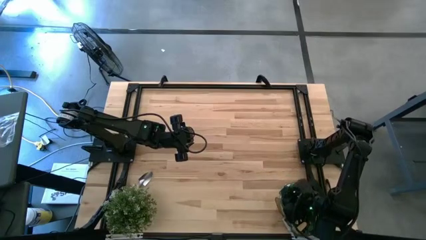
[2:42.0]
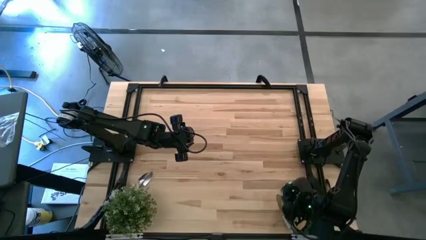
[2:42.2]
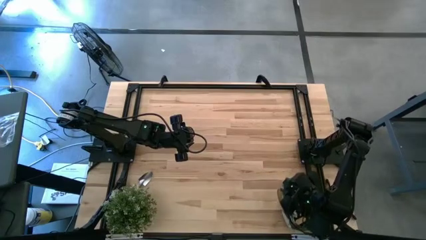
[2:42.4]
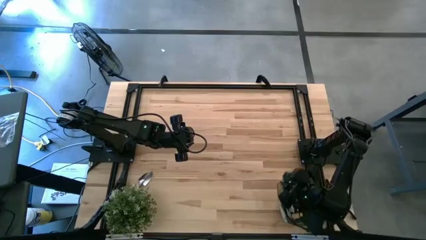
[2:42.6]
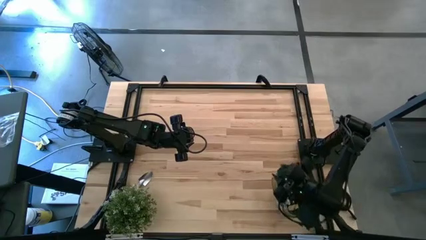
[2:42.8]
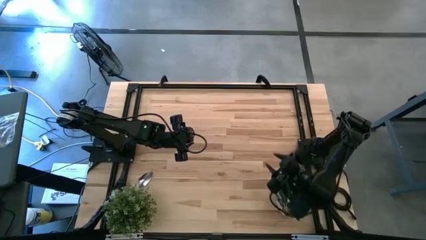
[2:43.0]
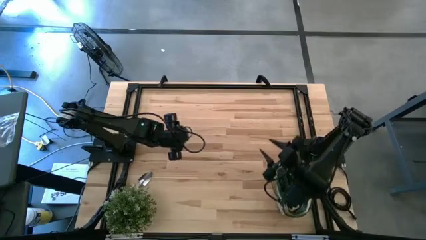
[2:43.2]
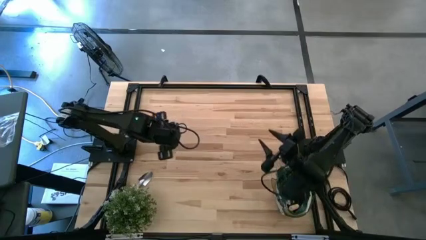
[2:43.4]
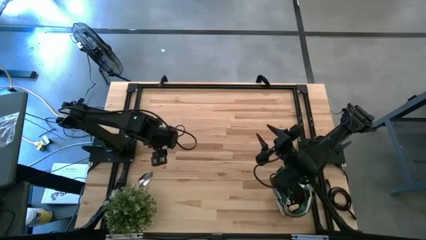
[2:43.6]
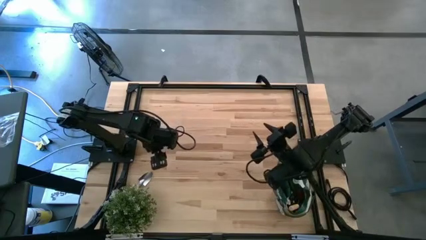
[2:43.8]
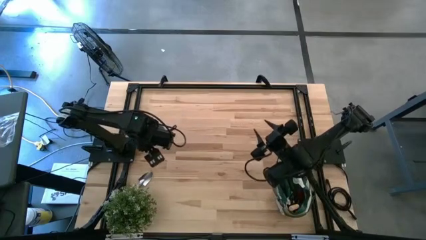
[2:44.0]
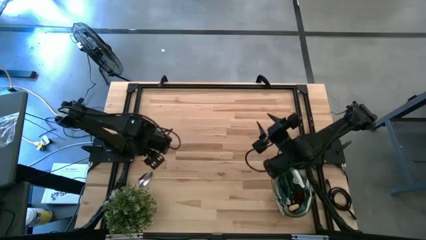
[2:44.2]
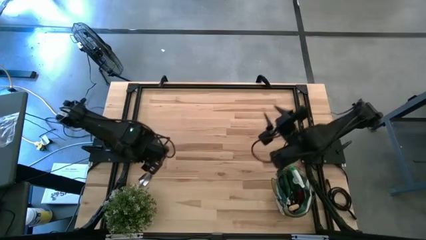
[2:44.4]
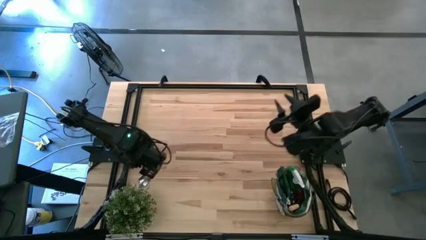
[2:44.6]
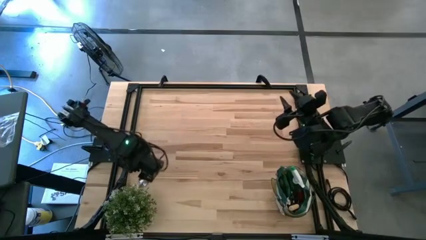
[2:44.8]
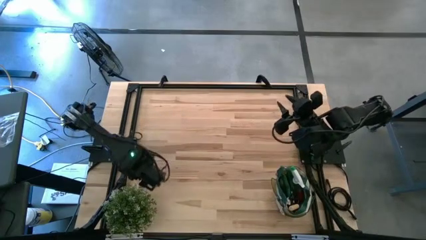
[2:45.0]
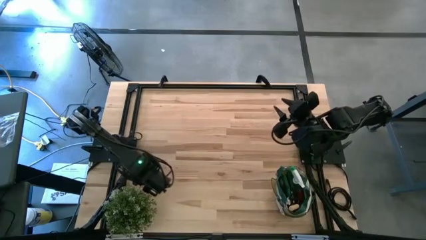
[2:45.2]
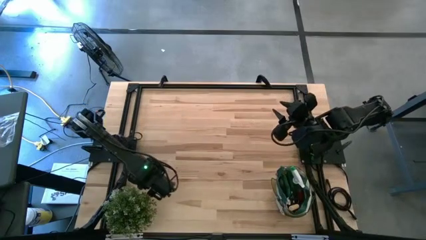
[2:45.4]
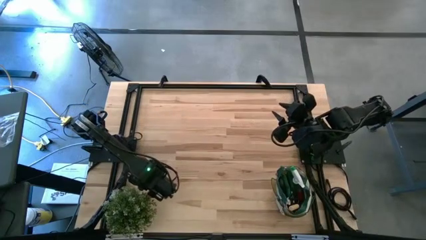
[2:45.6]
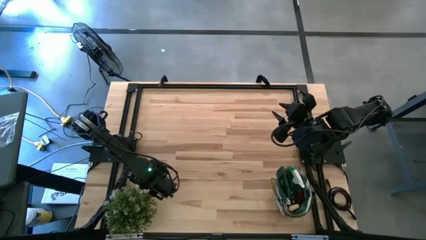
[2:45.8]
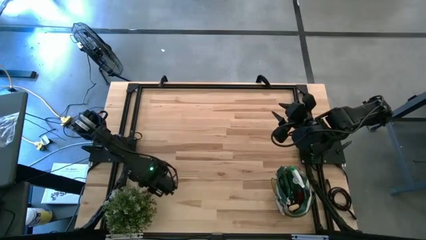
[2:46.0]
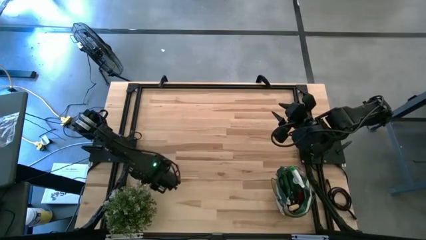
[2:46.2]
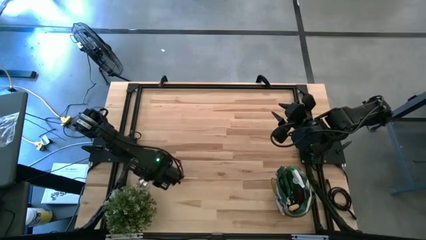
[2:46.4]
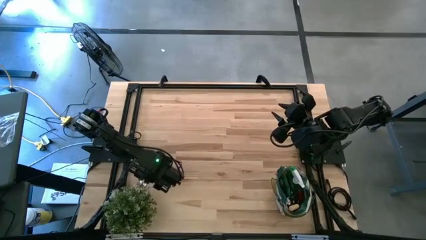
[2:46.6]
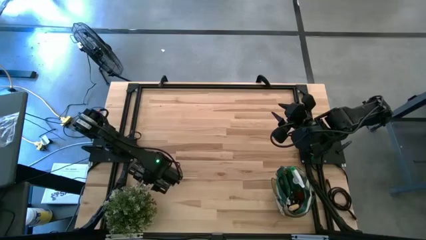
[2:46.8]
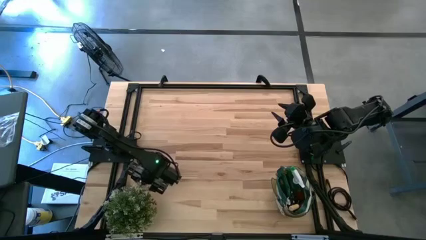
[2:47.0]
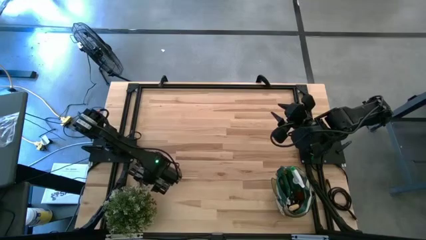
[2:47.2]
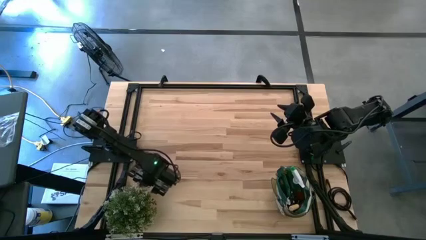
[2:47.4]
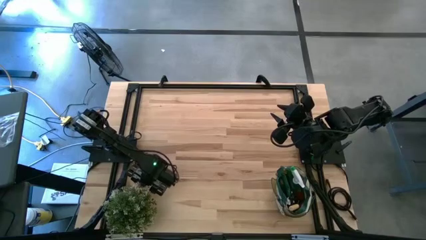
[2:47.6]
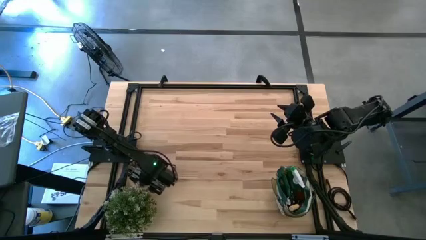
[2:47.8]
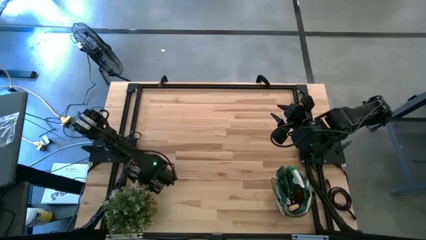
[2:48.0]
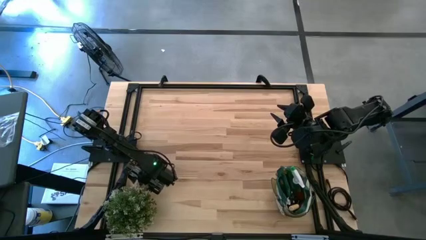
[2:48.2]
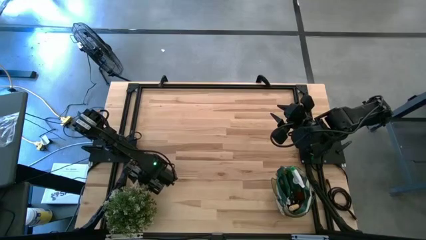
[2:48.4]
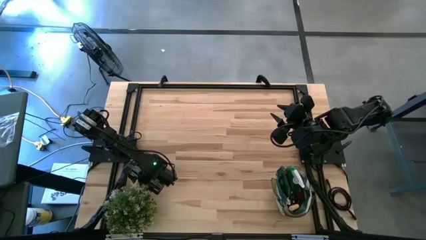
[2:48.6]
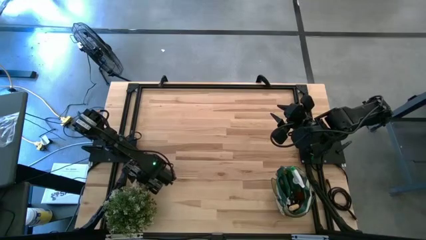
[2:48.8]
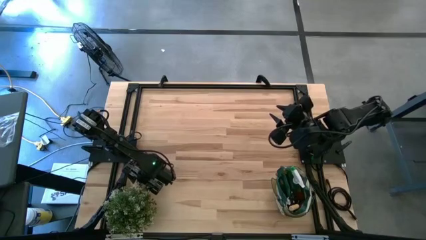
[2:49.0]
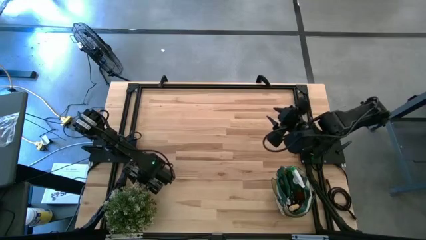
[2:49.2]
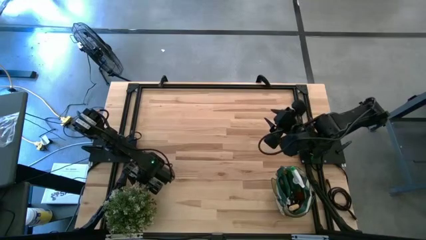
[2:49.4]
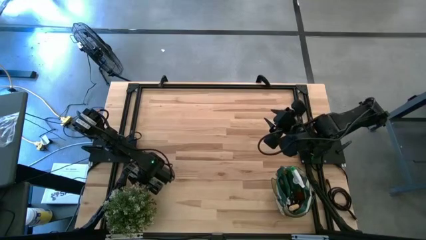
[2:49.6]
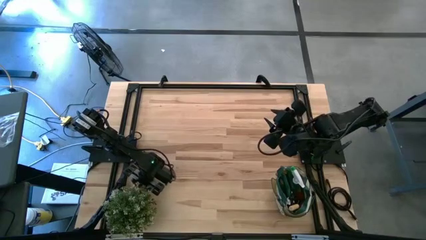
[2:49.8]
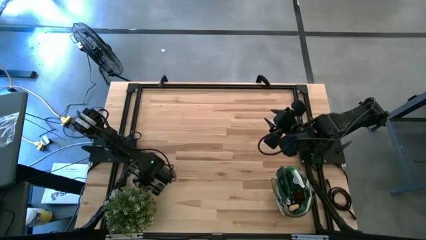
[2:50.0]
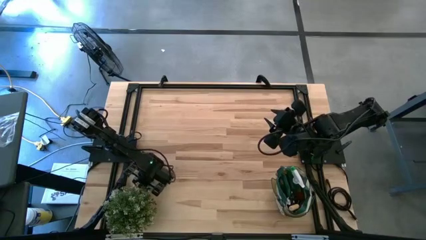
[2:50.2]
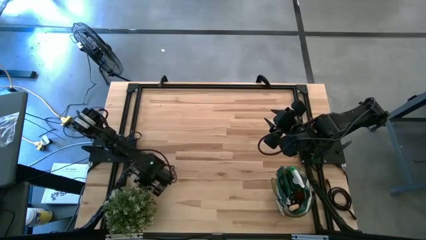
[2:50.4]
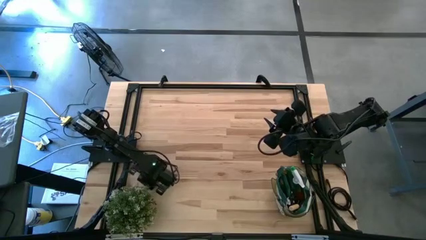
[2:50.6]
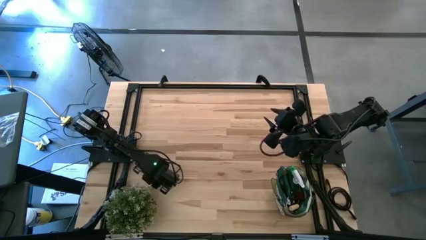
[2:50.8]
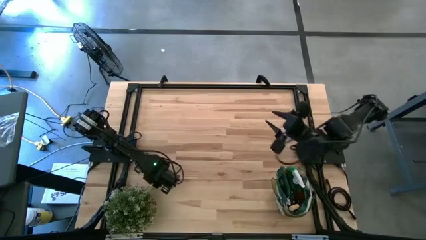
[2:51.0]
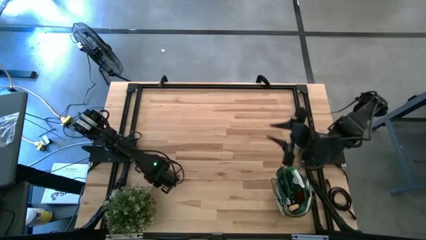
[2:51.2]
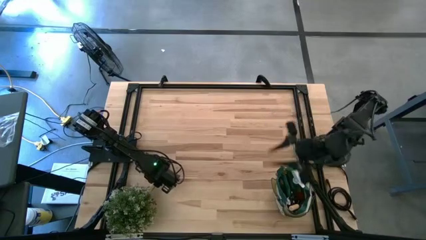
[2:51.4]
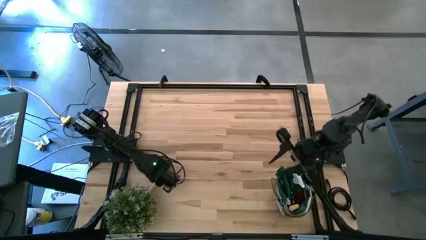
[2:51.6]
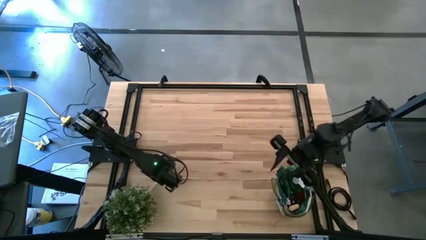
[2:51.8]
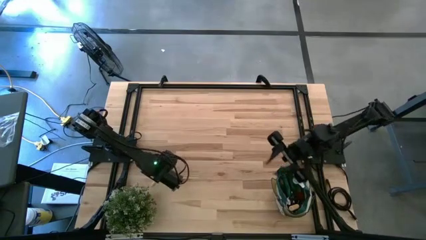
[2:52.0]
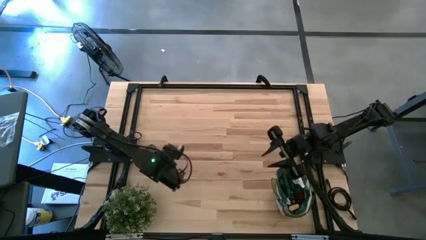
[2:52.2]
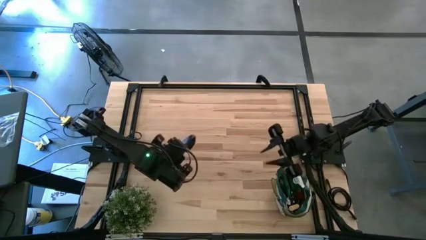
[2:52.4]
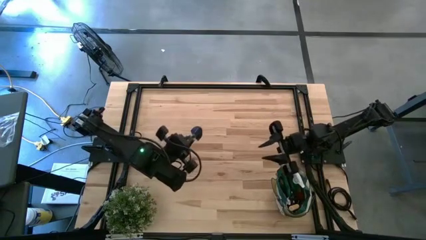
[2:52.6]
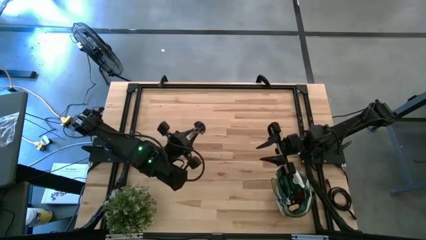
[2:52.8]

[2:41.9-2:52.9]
Task: Pick & Place Garden tools in Gardening bag
Put the brown trowel into the green gardening bag

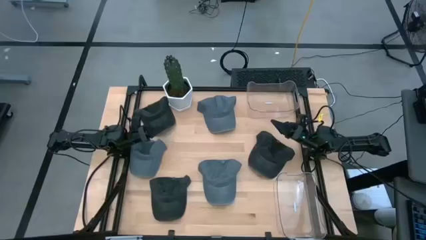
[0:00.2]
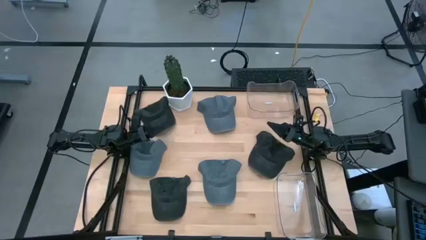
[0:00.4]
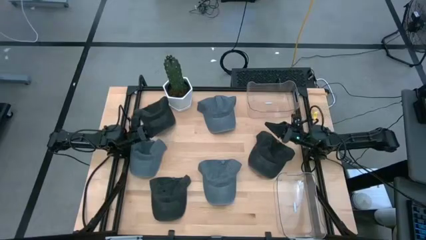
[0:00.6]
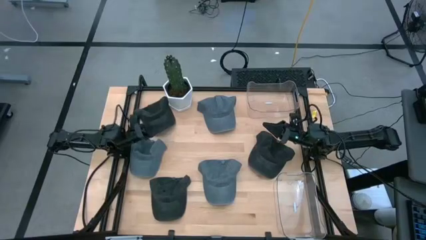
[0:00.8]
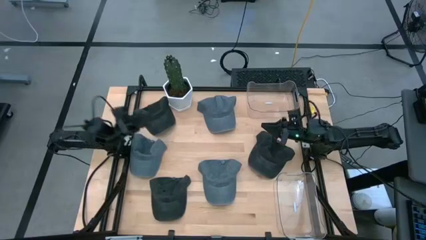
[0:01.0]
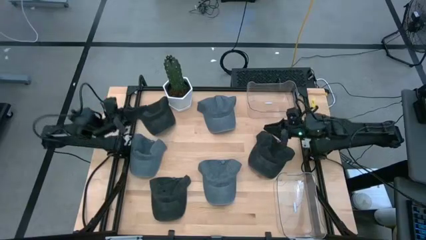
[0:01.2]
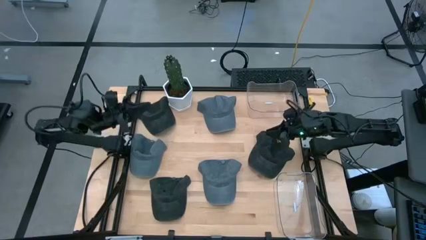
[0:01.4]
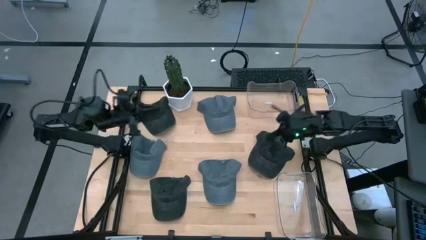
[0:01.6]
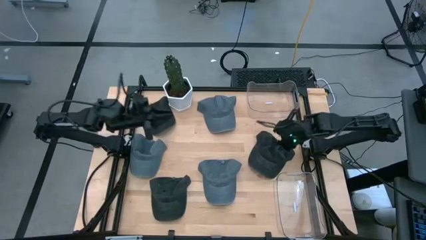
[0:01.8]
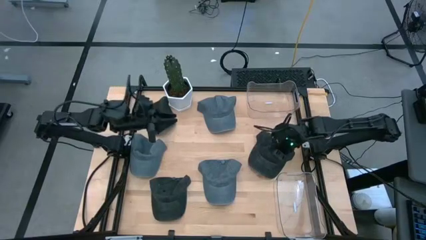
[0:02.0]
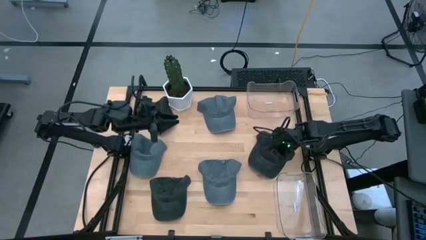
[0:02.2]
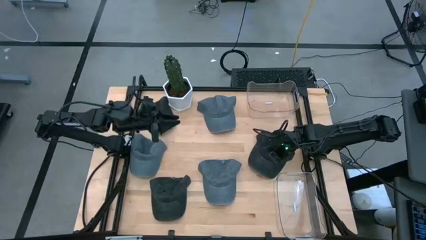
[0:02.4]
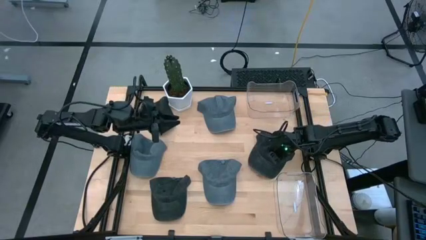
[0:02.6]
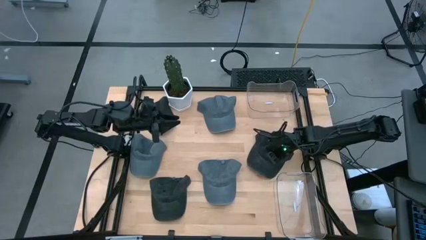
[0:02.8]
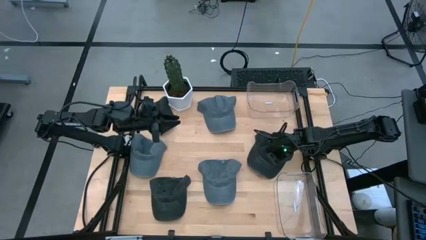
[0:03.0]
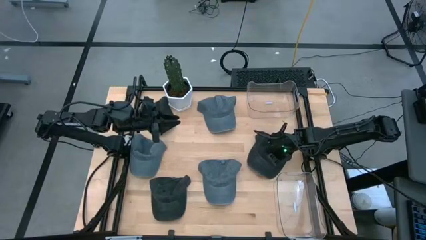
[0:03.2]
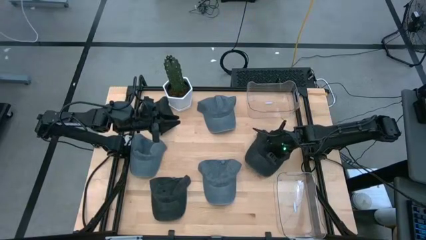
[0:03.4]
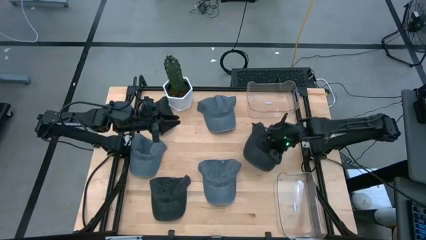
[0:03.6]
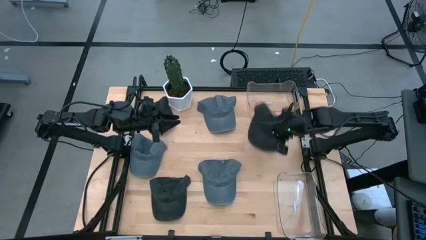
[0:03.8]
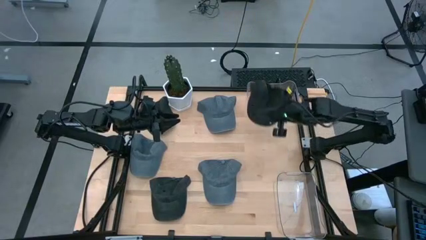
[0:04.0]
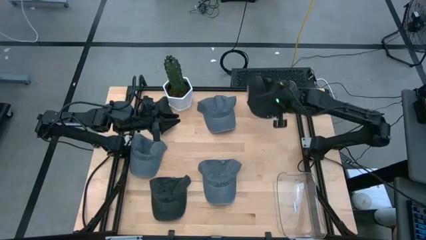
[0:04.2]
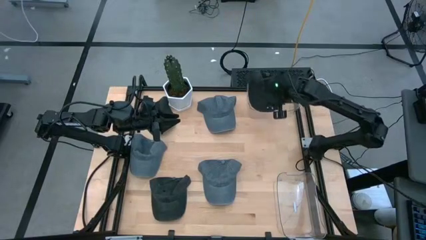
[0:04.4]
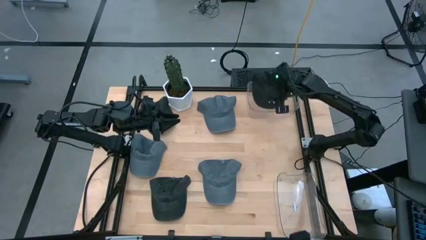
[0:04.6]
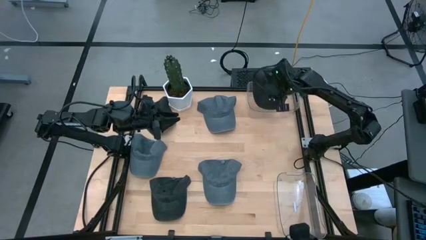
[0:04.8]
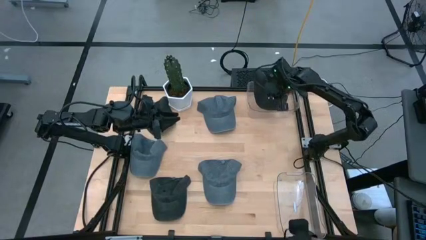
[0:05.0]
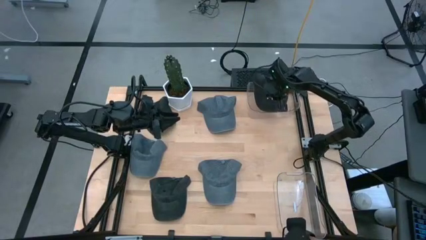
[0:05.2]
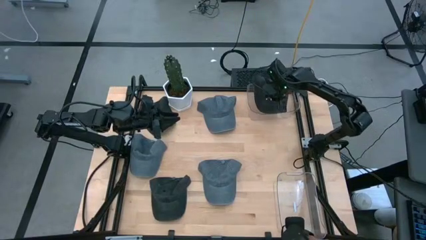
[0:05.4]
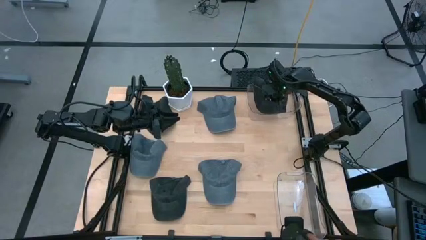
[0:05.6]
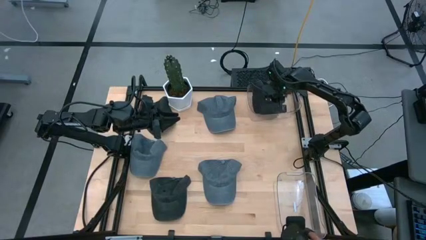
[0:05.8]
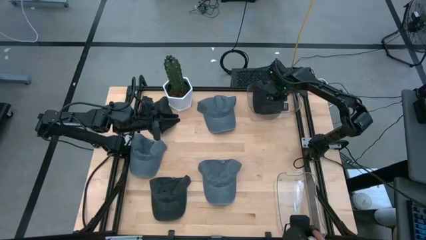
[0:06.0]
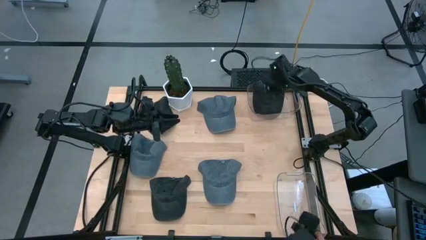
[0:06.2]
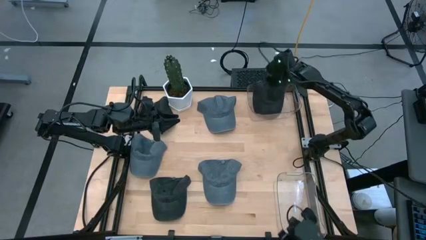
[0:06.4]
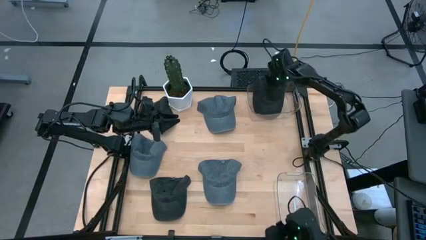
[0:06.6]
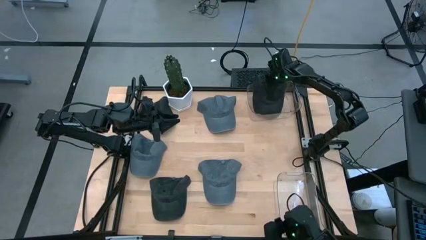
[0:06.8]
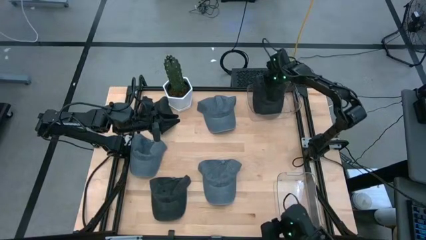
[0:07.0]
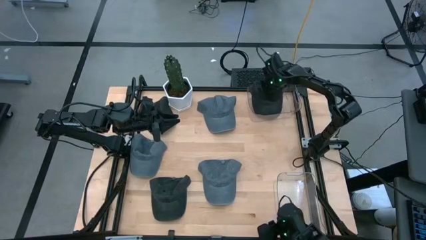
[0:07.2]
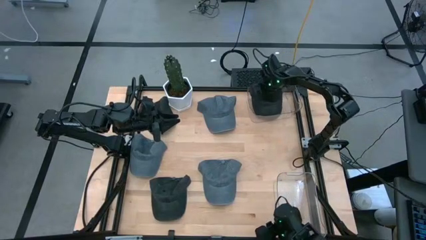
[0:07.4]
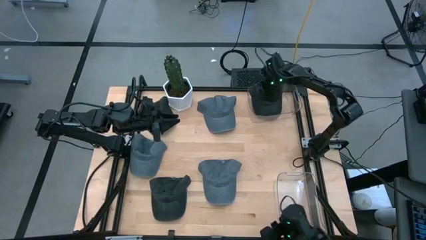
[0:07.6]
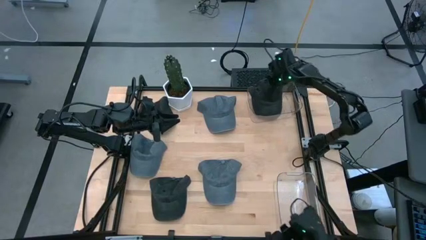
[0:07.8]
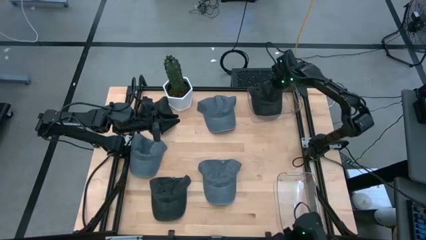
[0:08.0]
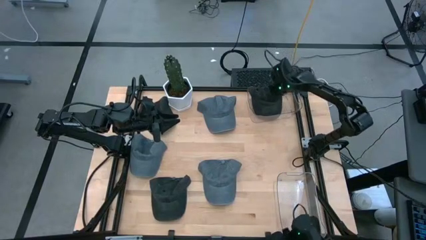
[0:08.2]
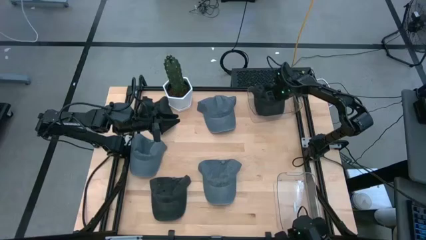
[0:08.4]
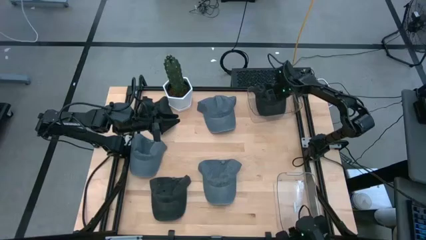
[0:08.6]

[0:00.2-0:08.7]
Task: Pick & Place hat
Put the middle black cap into the top transparent bin
